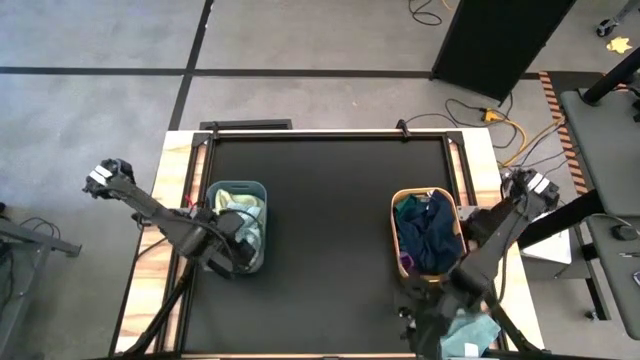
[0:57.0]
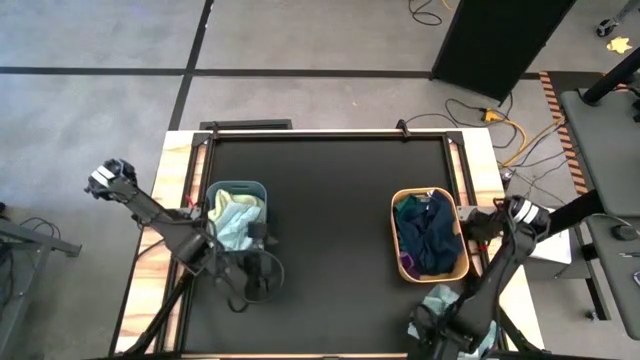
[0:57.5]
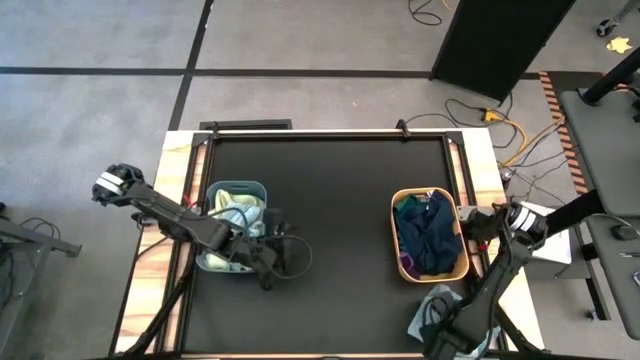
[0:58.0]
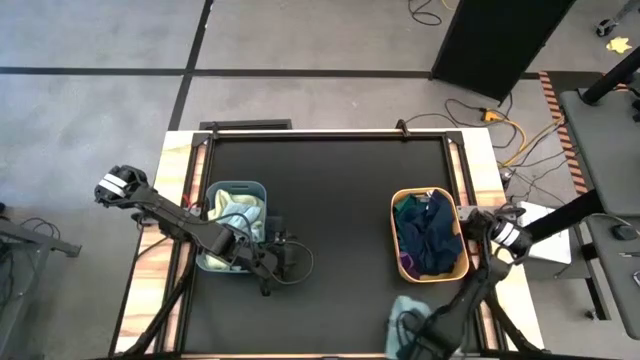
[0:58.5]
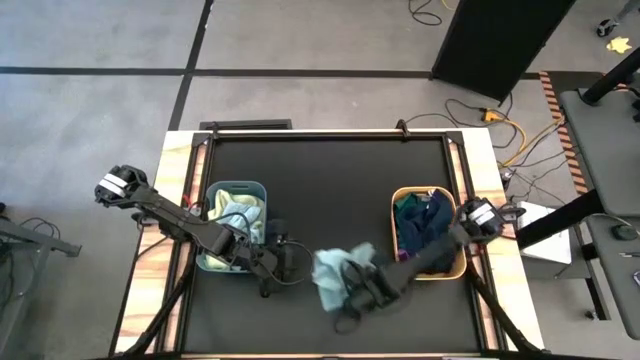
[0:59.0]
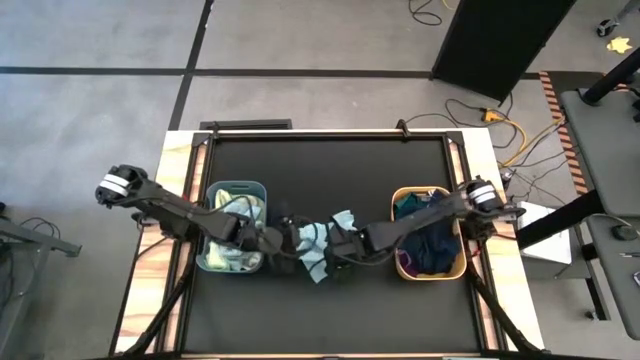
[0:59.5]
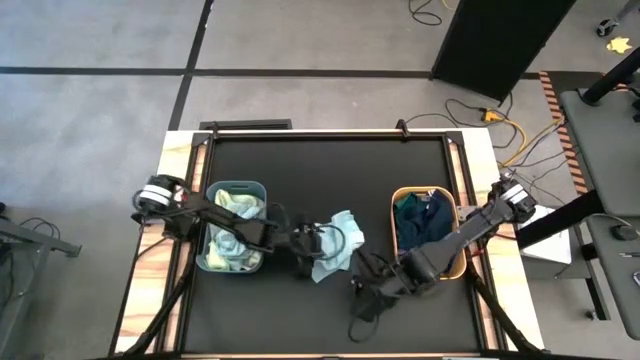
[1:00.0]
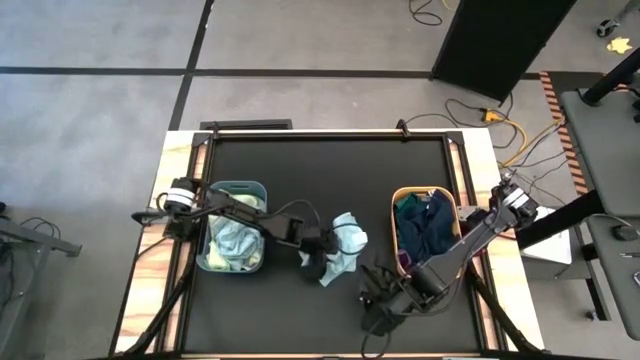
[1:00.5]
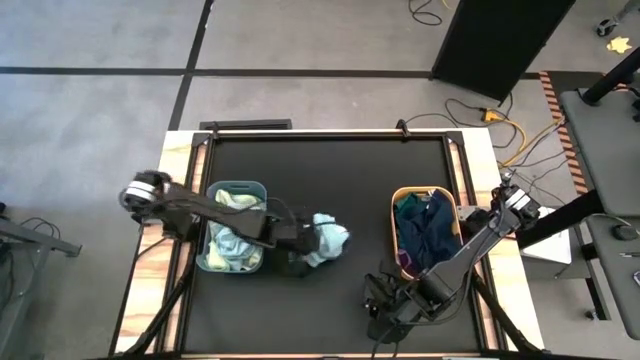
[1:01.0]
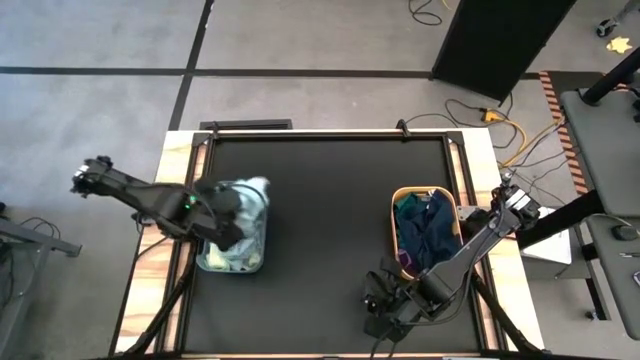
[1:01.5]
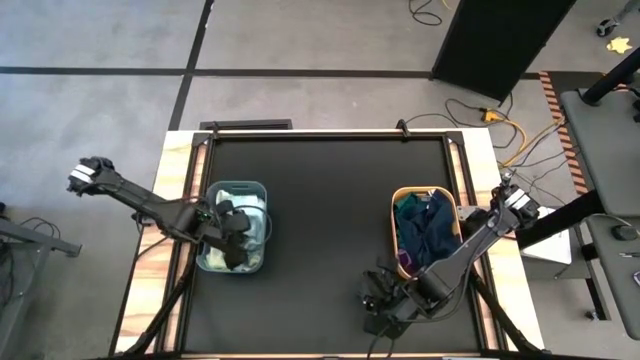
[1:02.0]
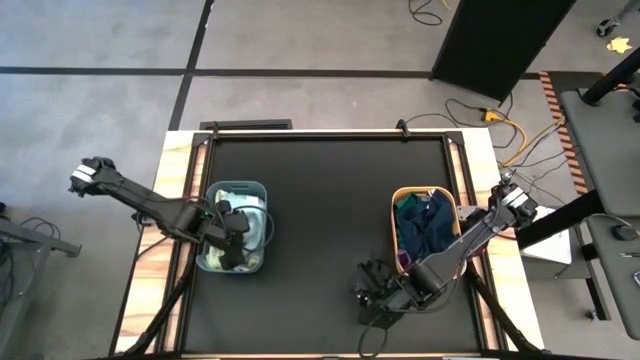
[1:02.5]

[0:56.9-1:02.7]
Task: Sort microfiber towel by color & place in baskets
Put the light blue towel into the blue green bin

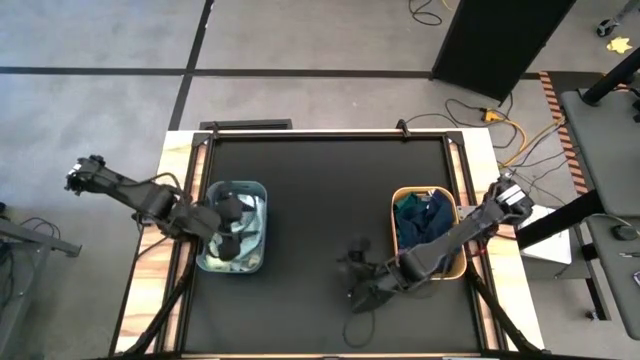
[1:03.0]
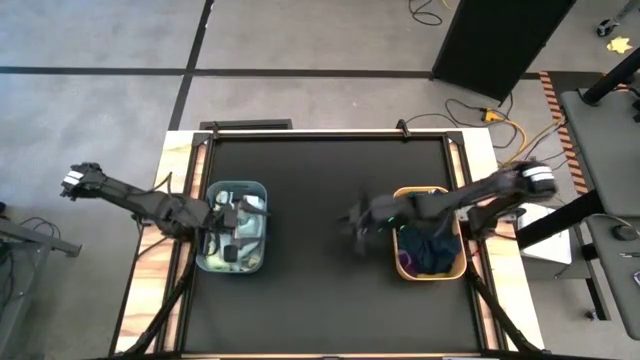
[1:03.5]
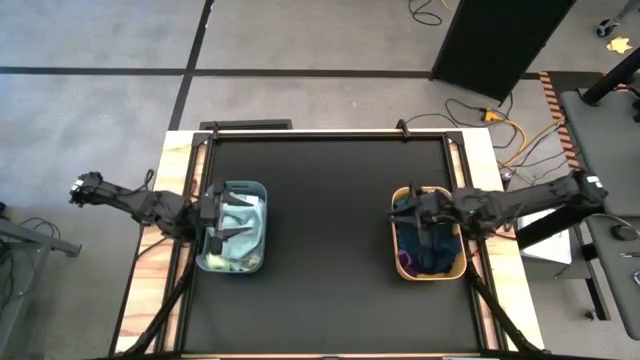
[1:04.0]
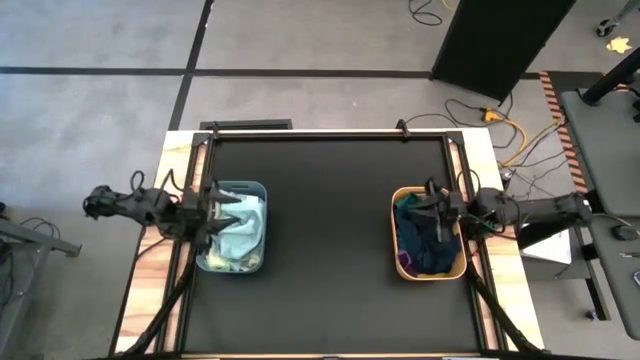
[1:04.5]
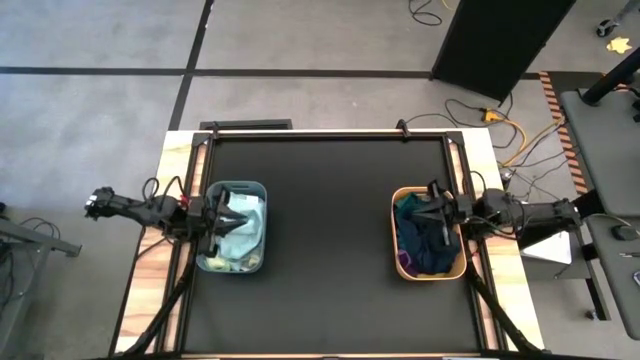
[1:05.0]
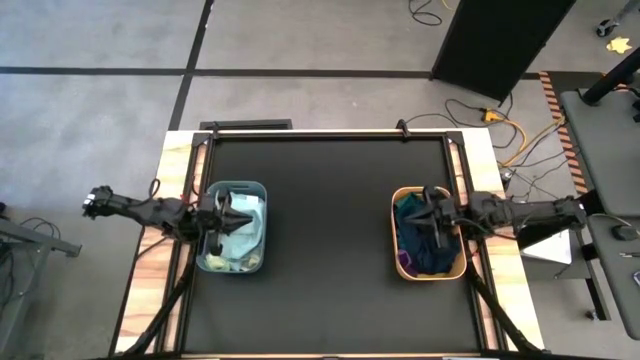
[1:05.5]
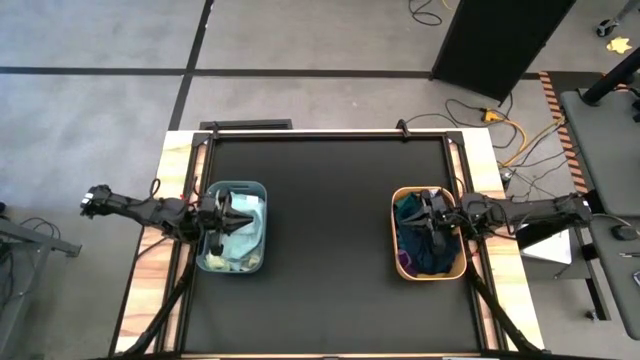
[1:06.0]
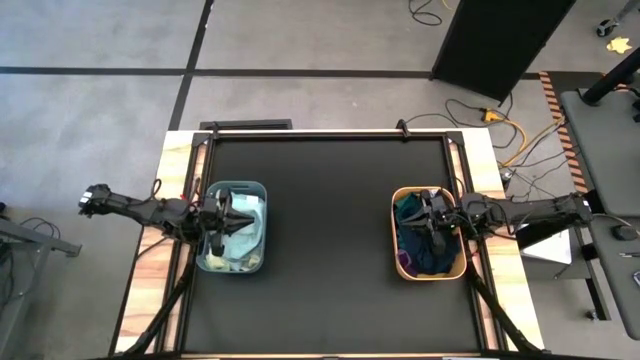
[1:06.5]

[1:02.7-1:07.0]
Return to Home Position

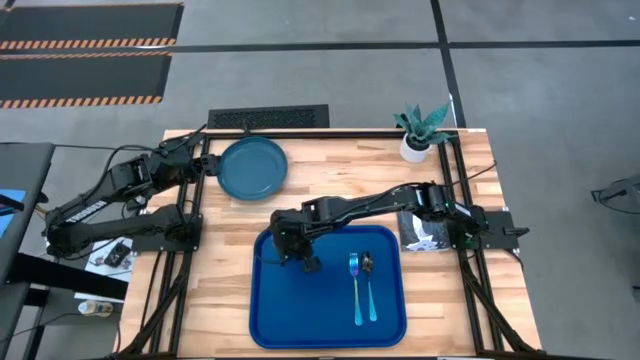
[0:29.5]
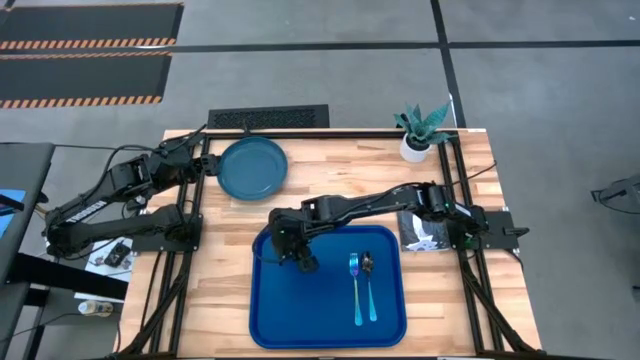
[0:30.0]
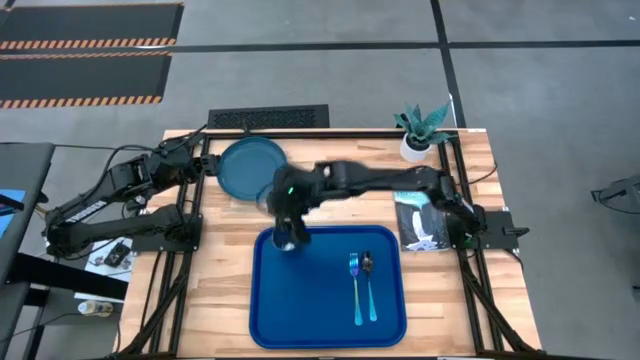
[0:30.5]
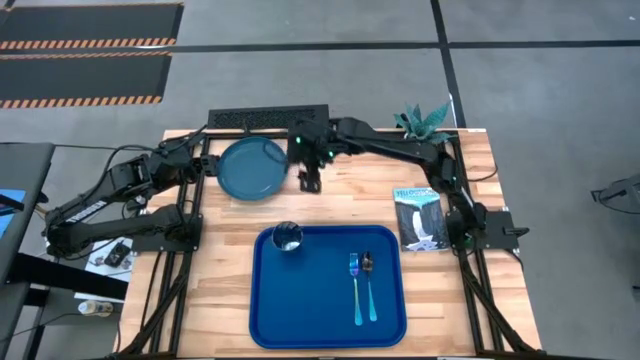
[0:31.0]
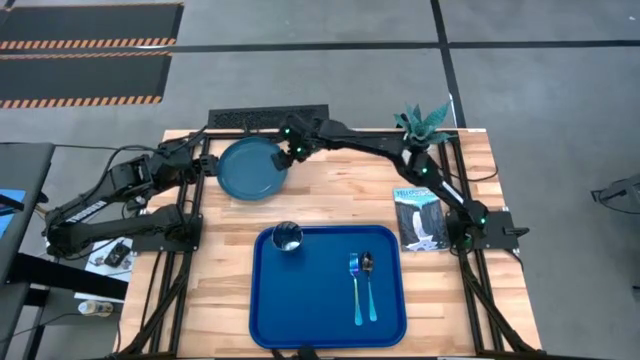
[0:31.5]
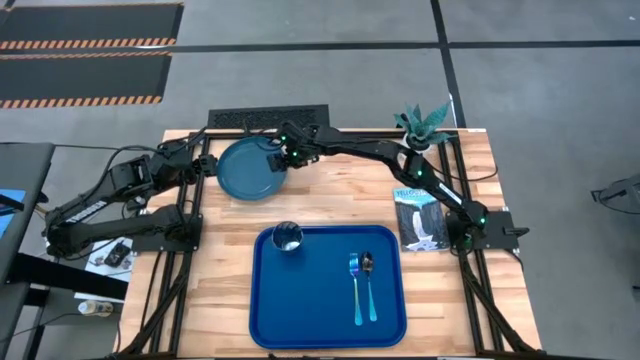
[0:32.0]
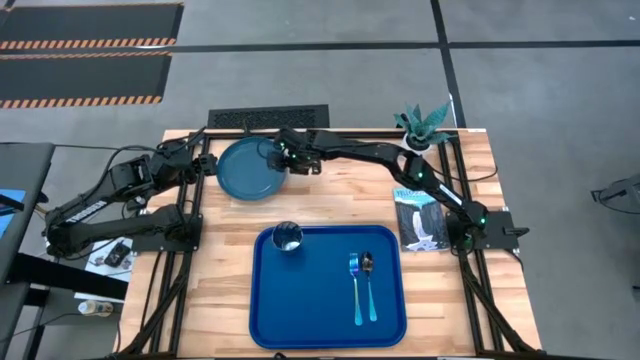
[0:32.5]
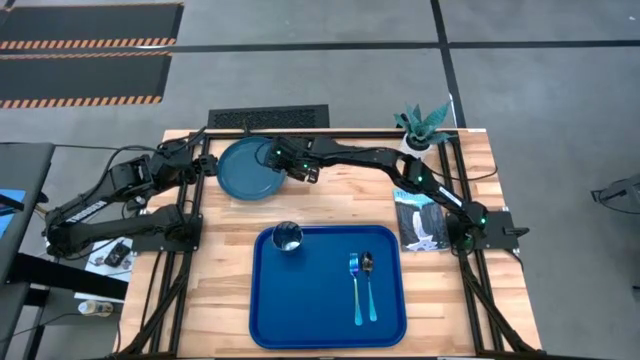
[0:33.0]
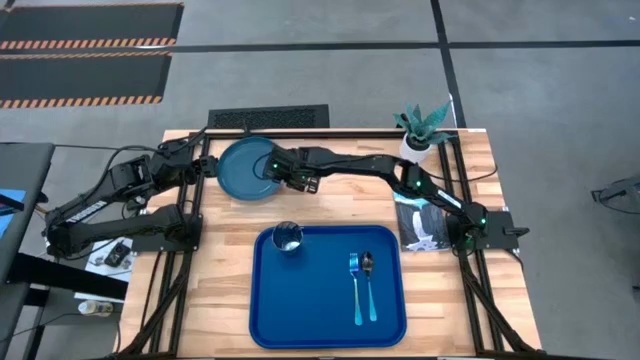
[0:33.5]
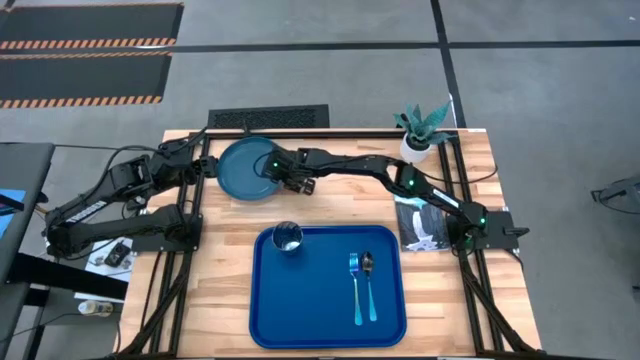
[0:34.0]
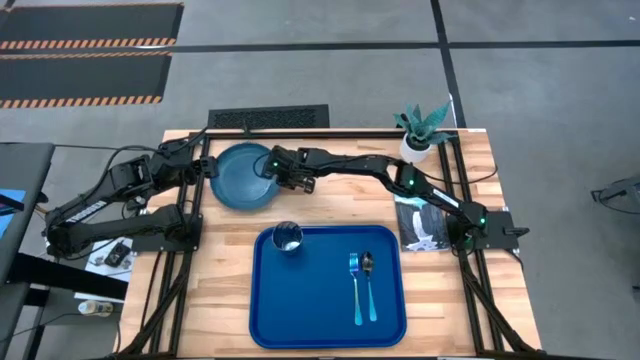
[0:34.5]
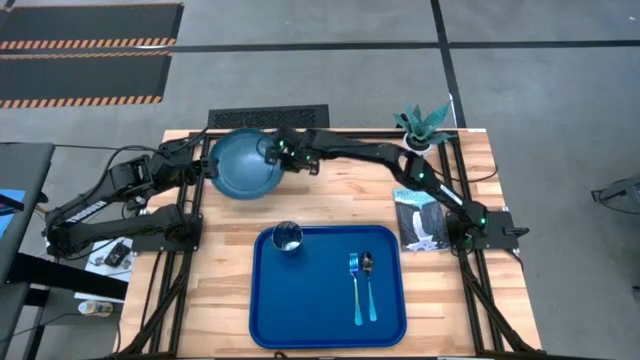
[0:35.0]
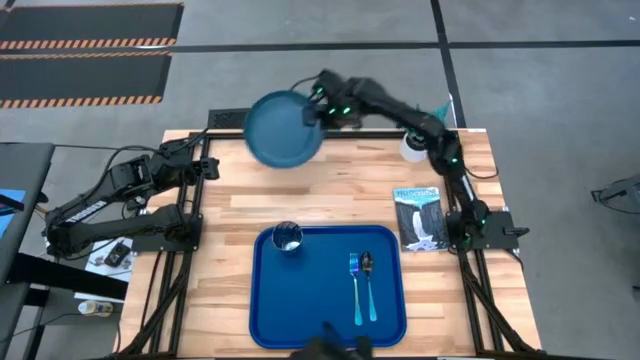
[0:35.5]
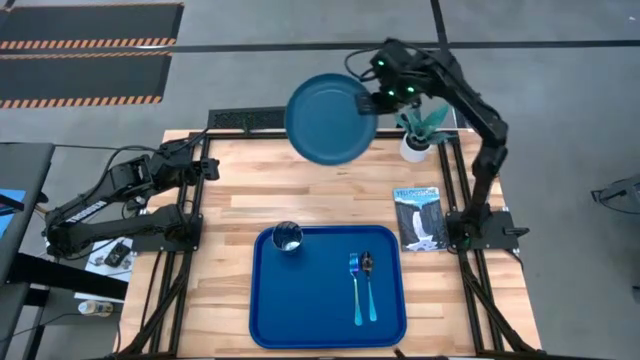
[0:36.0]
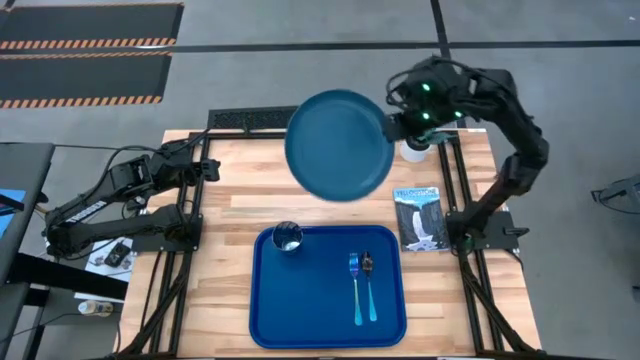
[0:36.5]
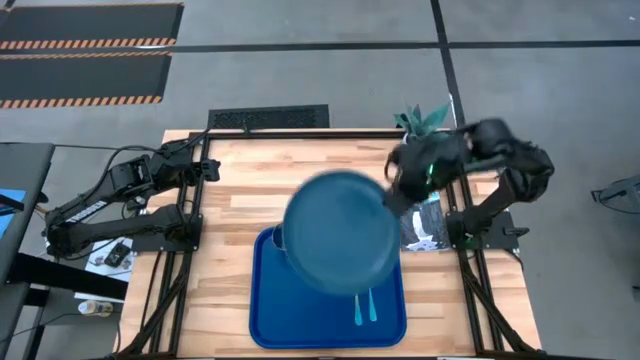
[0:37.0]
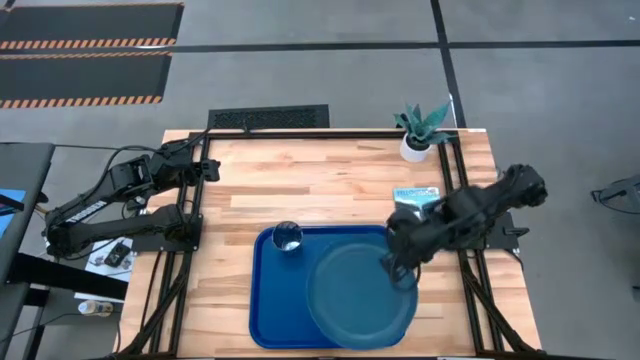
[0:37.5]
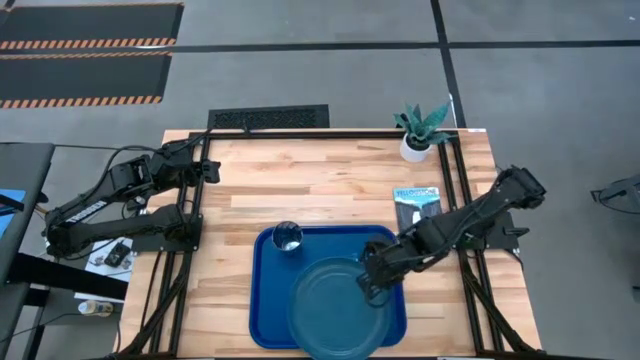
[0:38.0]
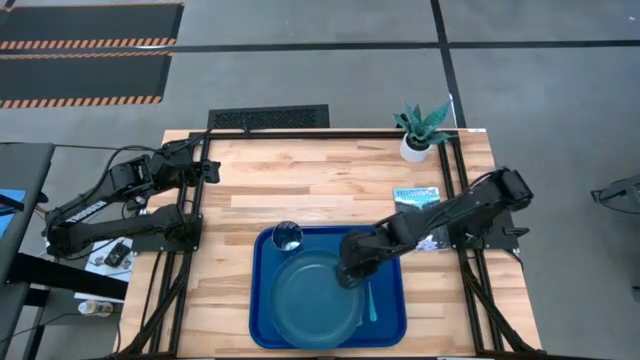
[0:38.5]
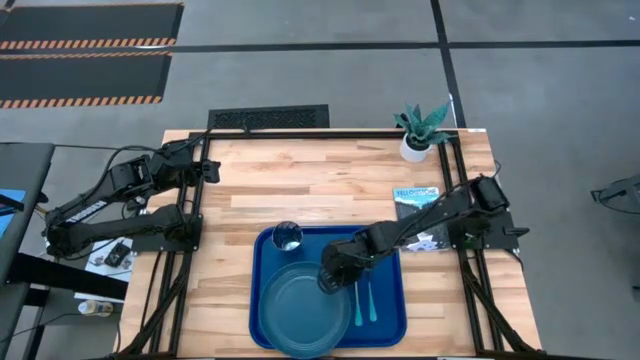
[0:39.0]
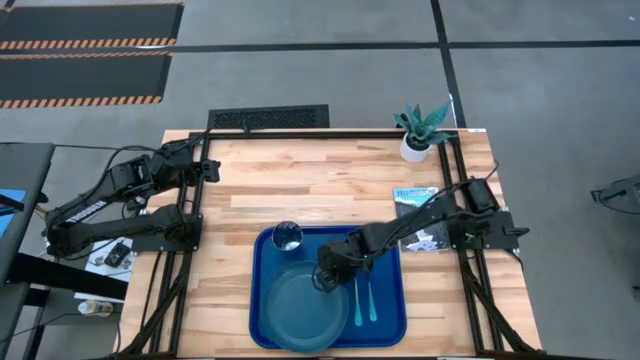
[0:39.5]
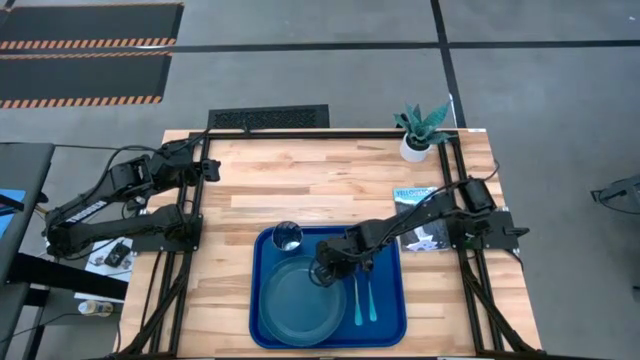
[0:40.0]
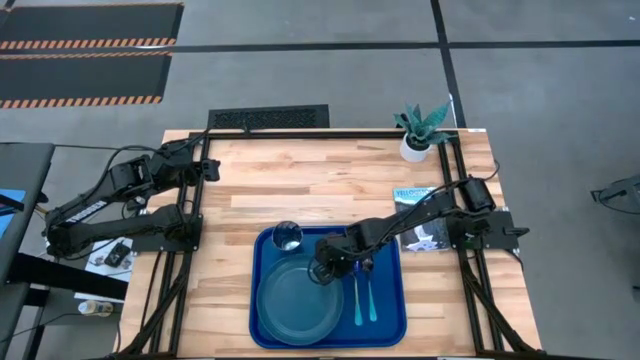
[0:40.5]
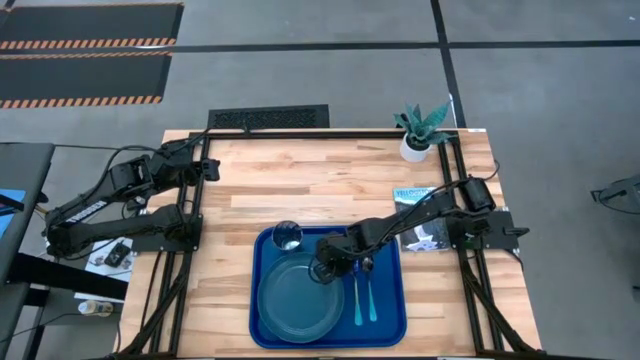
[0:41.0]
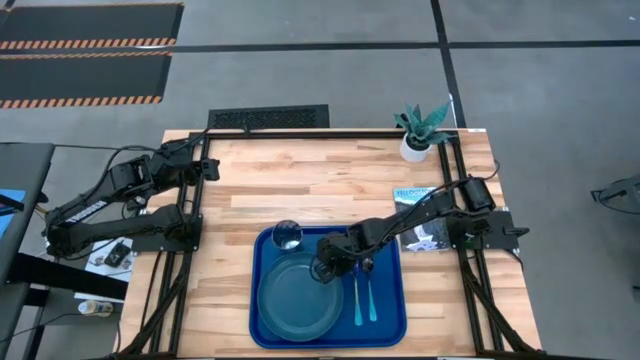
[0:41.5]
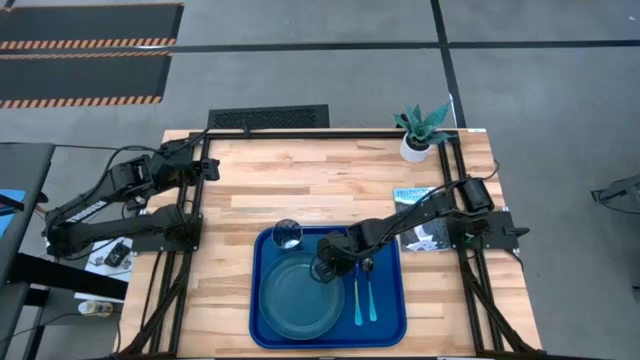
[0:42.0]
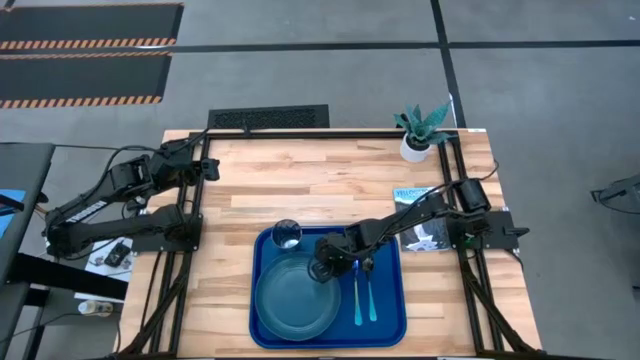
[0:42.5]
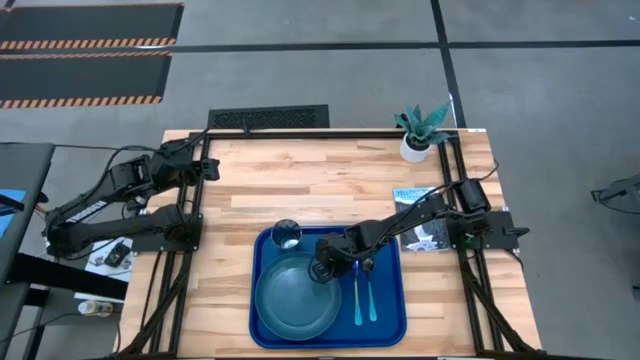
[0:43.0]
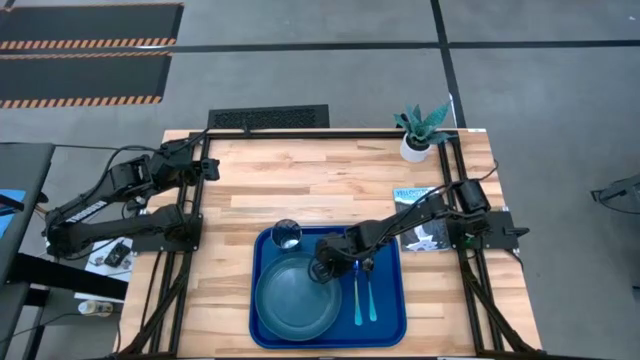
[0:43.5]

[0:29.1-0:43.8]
Task: Pick and place plate/cup/fork/spoon on tray
Put the blue plate on the blue tray
